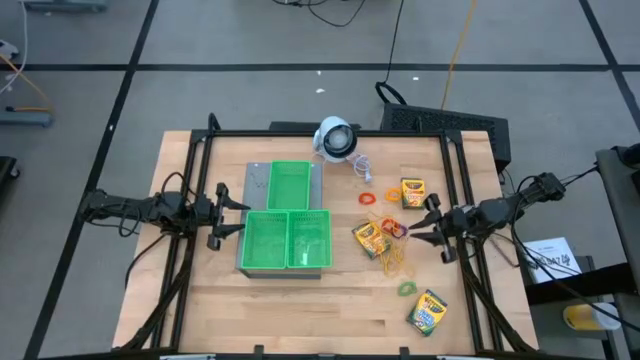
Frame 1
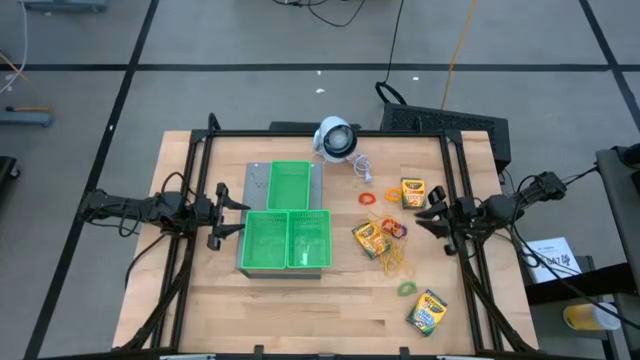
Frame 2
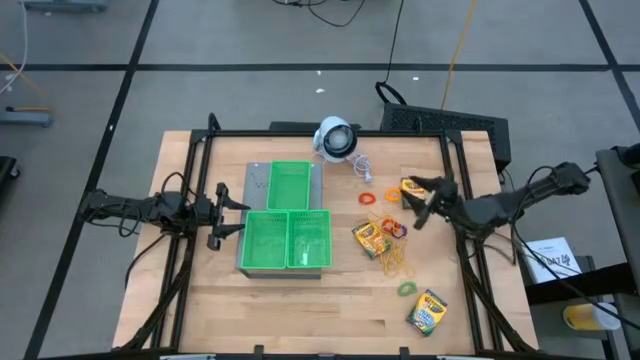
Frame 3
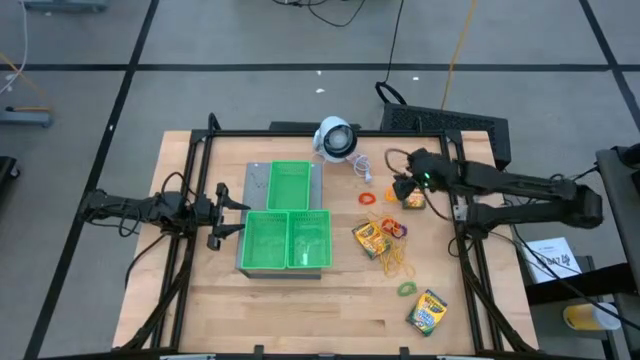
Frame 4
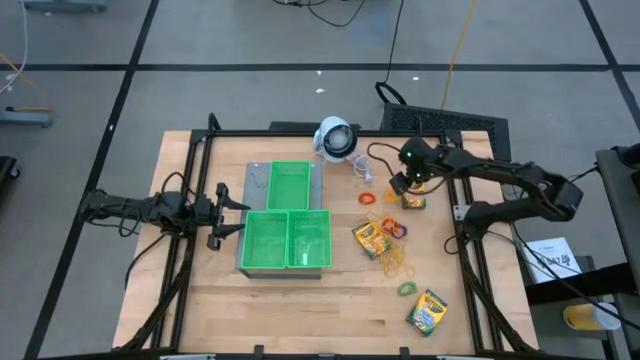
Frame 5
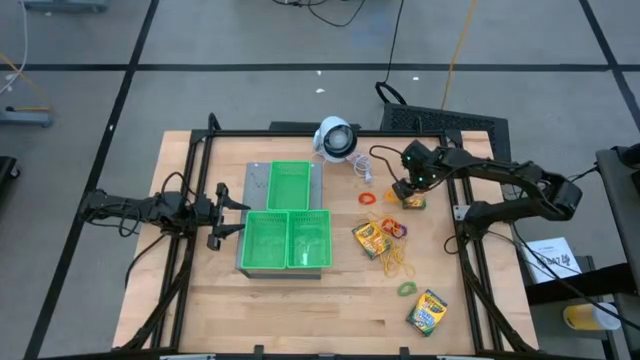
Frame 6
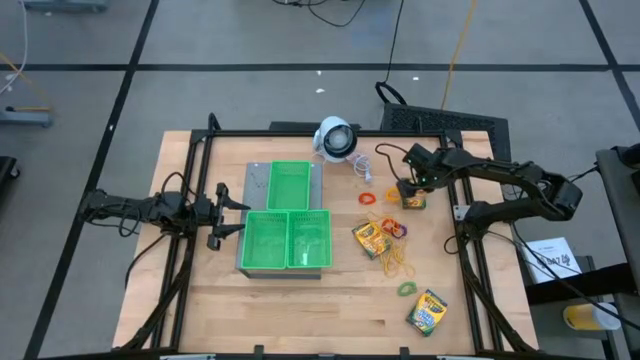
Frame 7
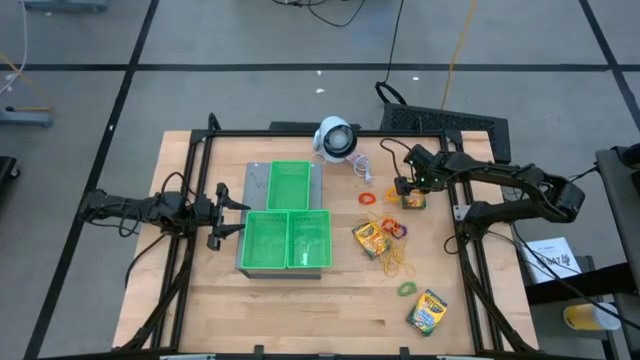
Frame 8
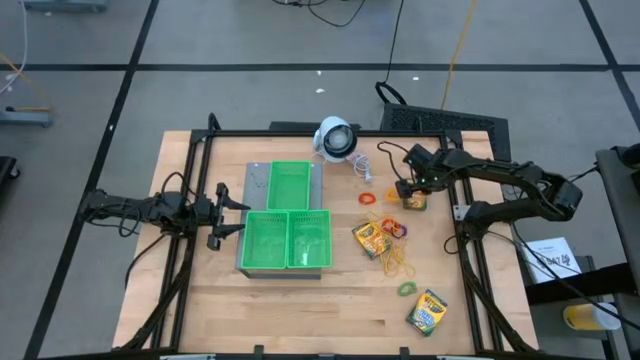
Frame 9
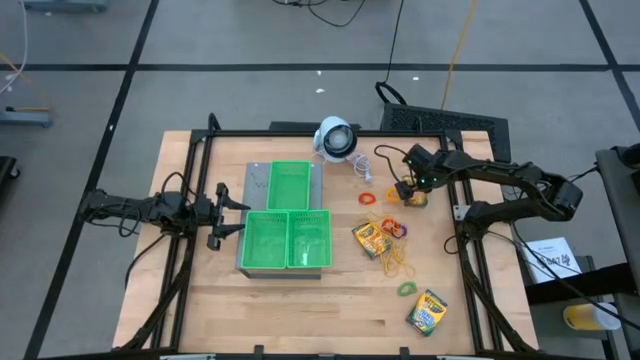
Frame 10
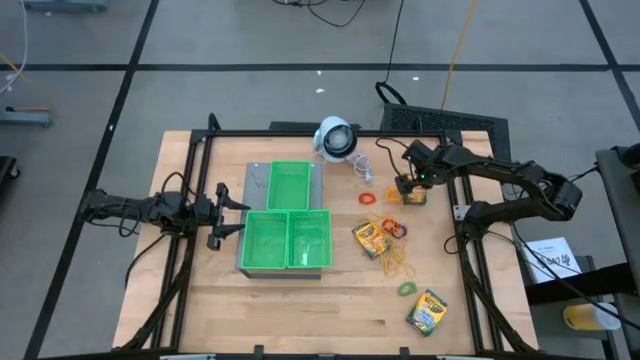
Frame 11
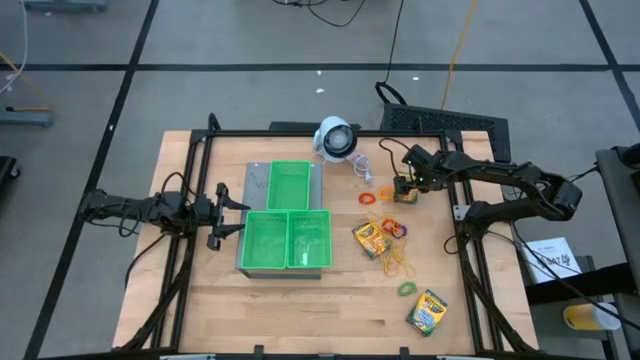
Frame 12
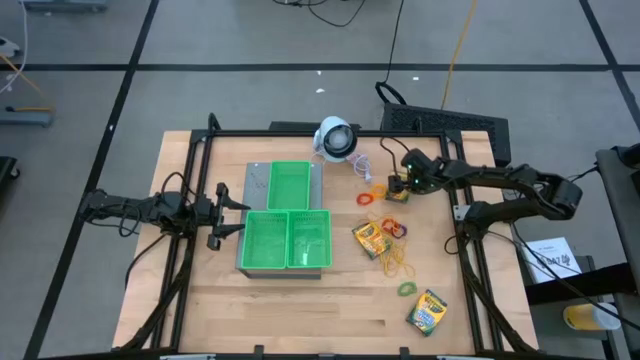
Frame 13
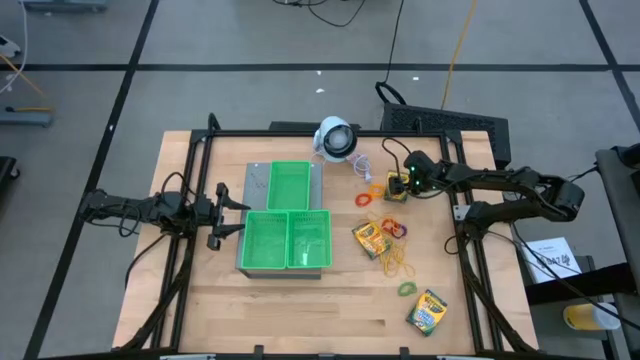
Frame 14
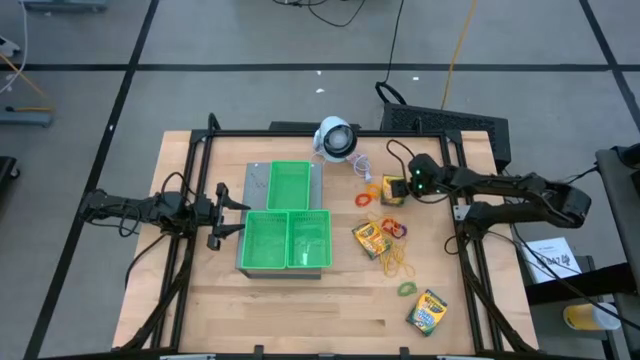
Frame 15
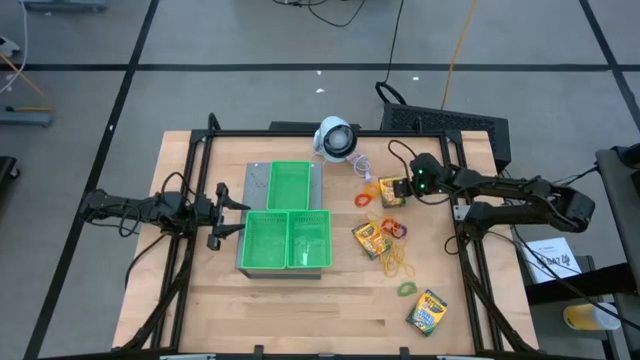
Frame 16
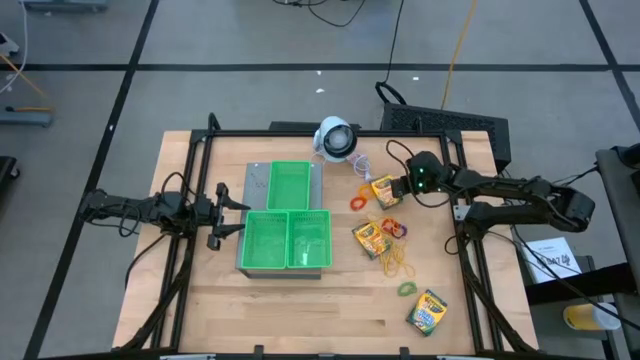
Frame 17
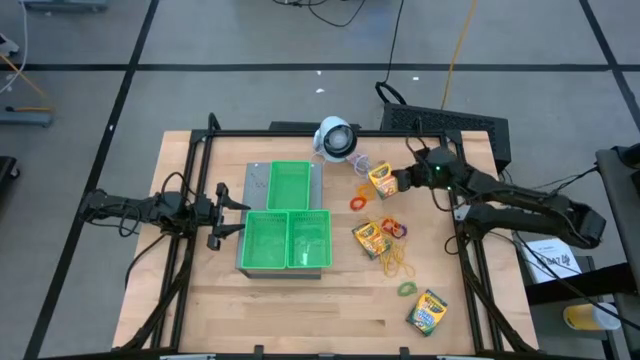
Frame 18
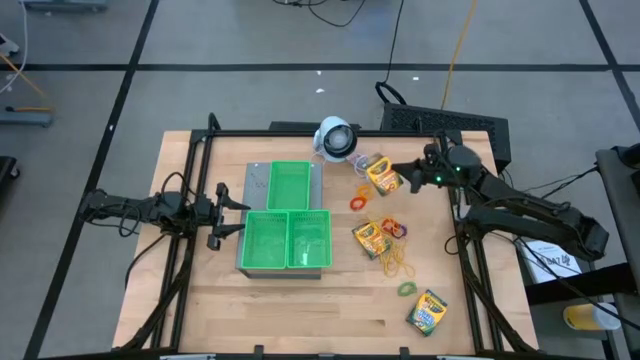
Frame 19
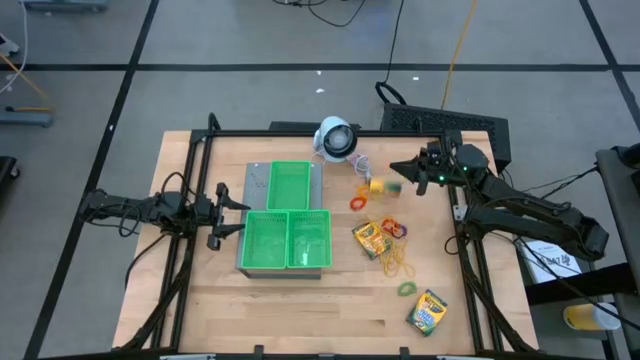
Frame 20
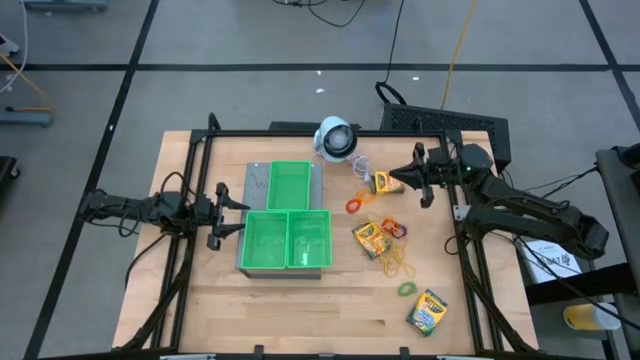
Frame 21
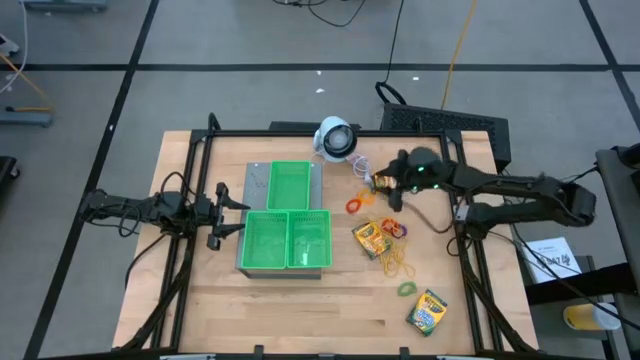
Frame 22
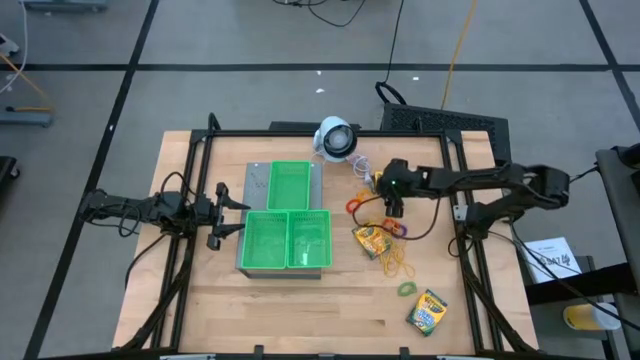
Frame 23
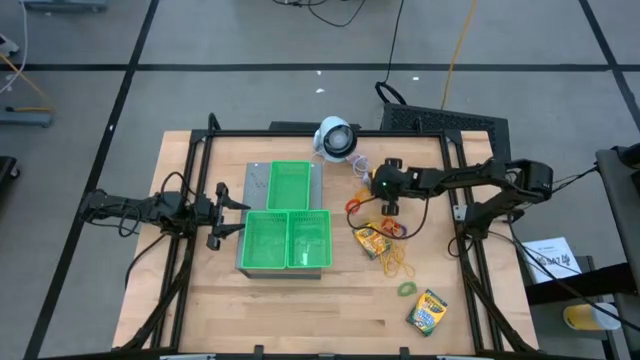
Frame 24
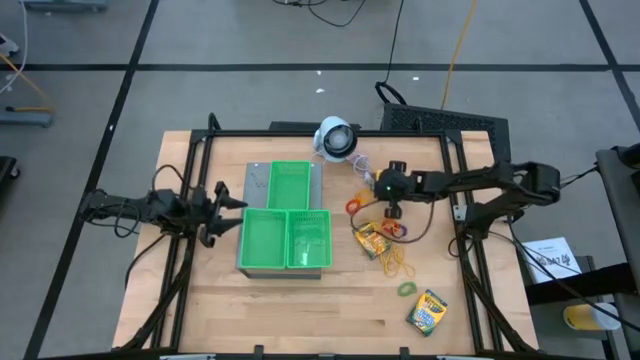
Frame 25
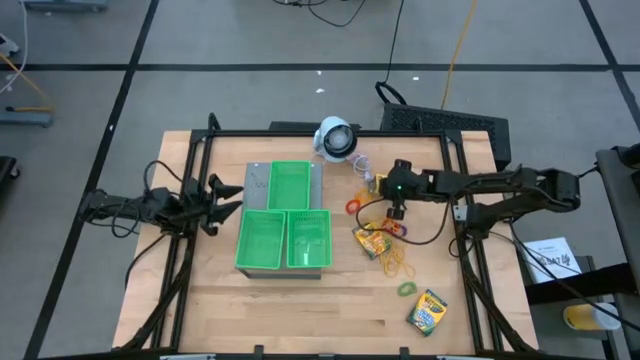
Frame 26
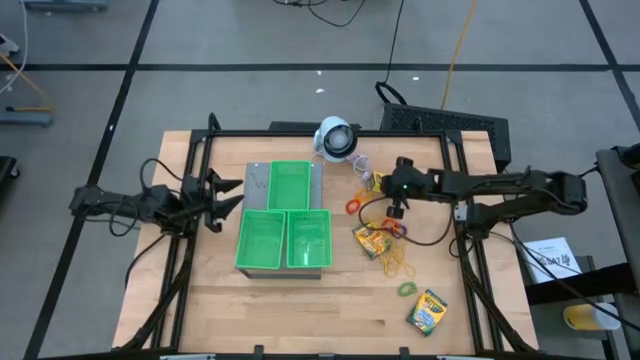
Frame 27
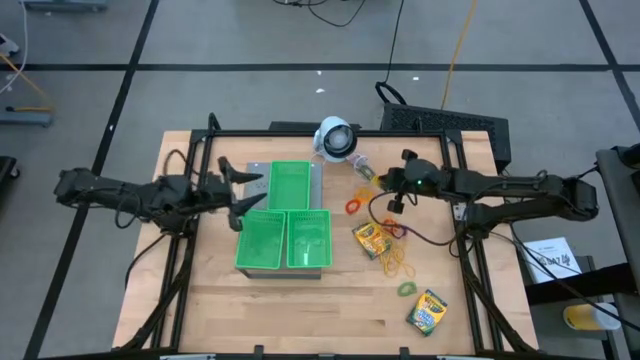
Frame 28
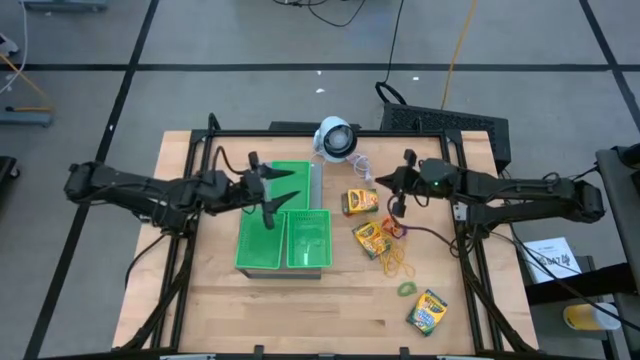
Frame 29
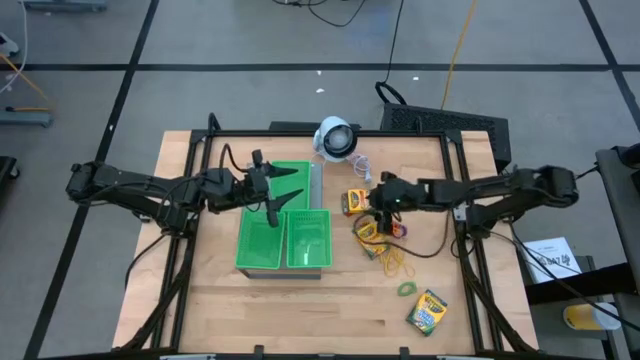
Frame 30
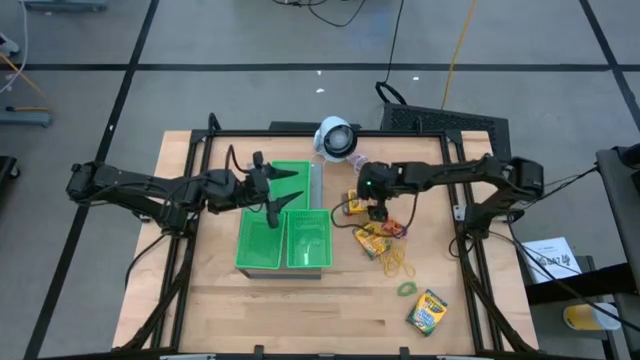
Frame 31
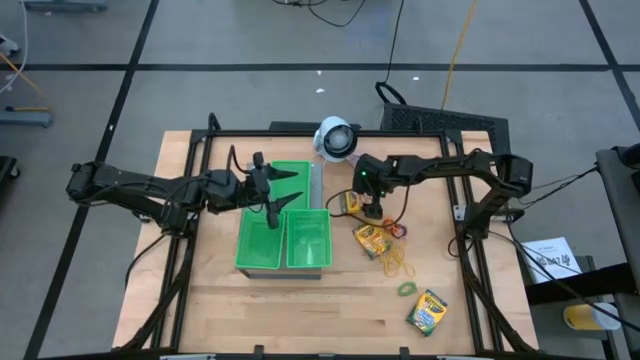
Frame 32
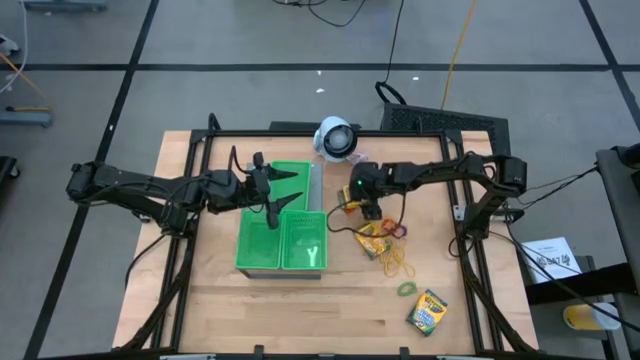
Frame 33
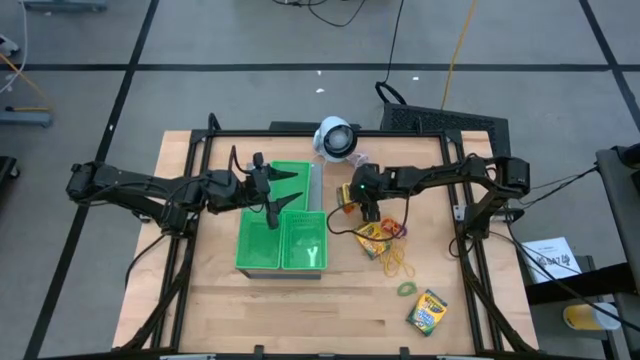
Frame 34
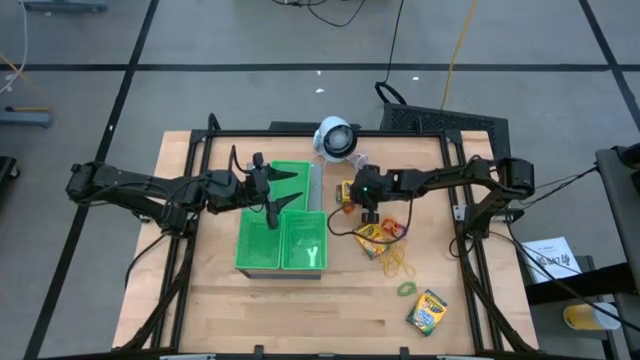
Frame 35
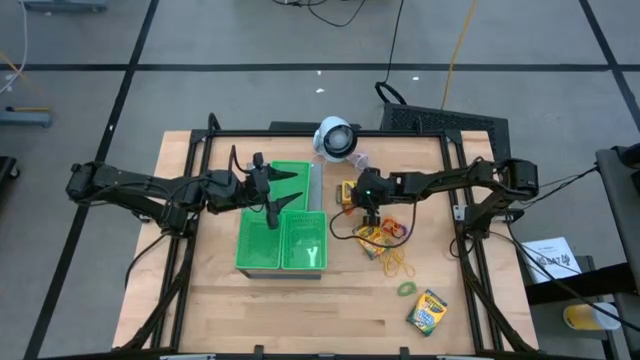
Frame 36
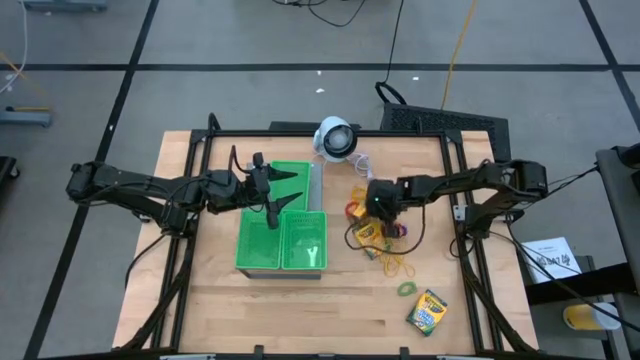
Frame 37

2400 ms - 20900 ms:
Task: Pick & Place Office Desk Supplies
Put the crayon box into the top green basket on the shelf

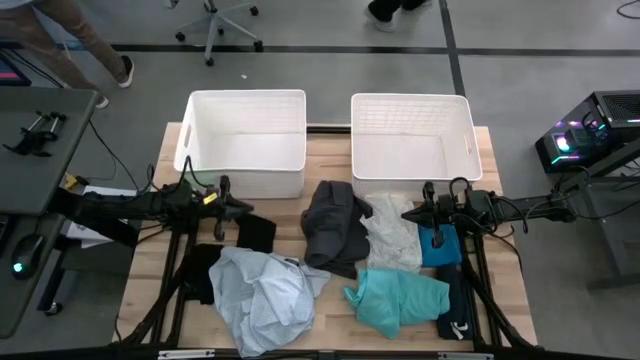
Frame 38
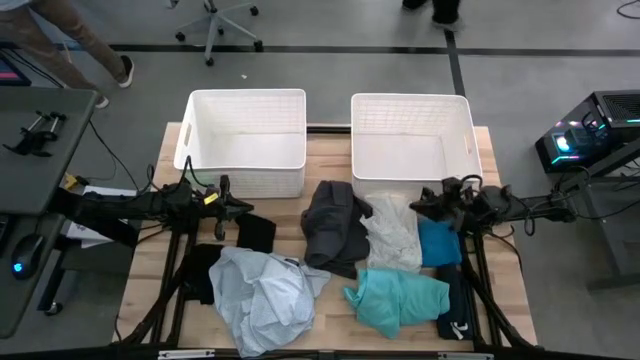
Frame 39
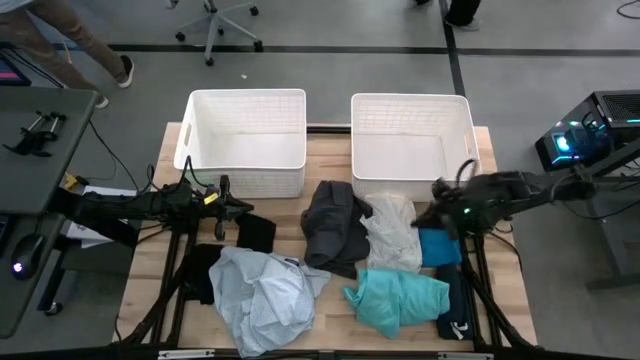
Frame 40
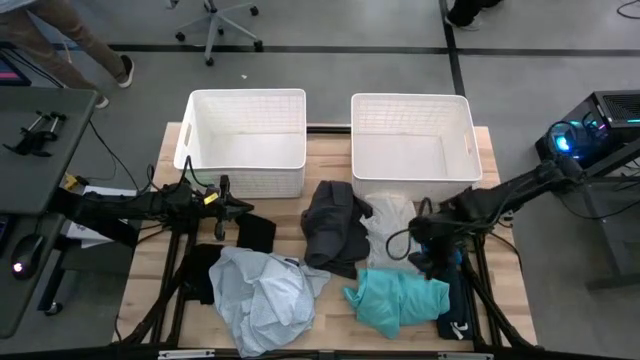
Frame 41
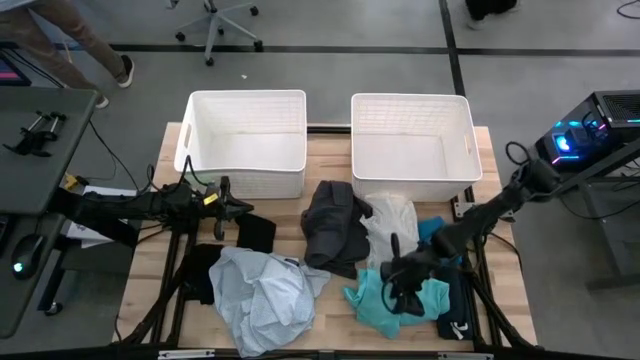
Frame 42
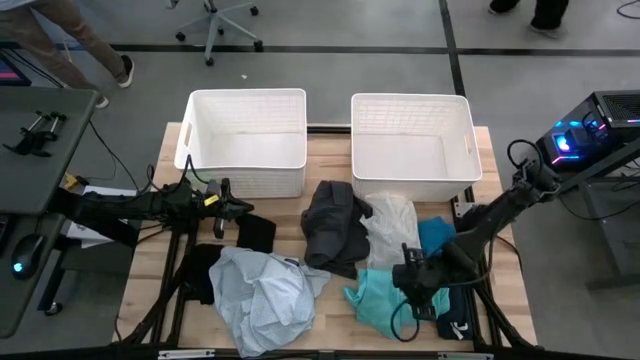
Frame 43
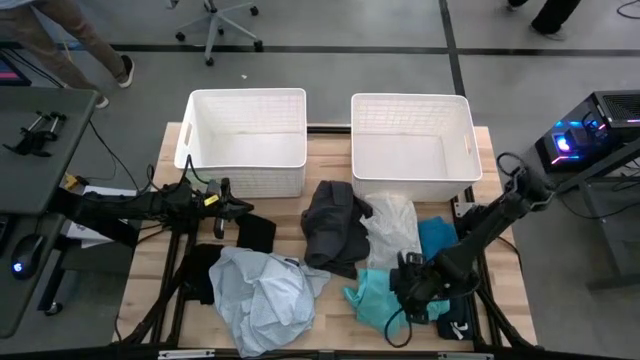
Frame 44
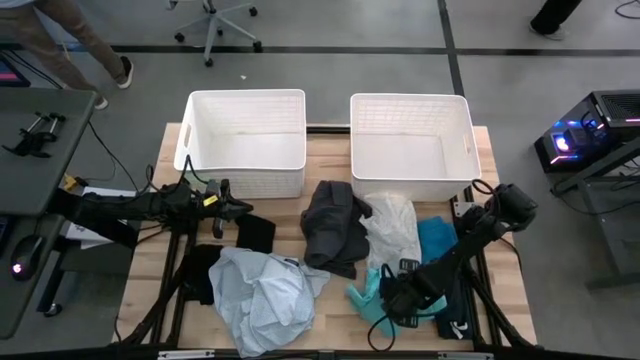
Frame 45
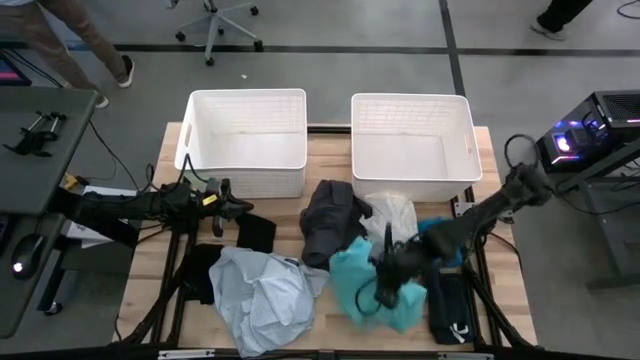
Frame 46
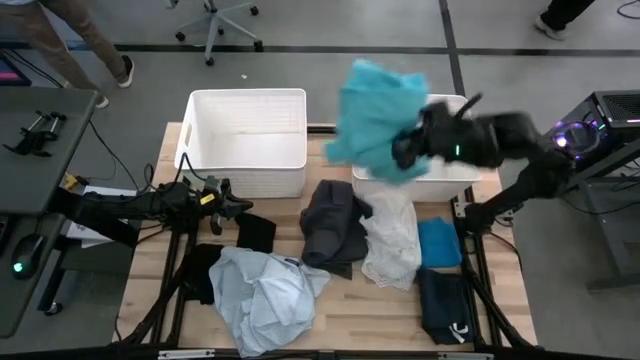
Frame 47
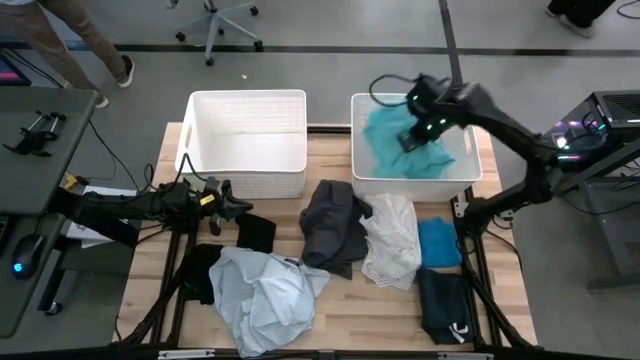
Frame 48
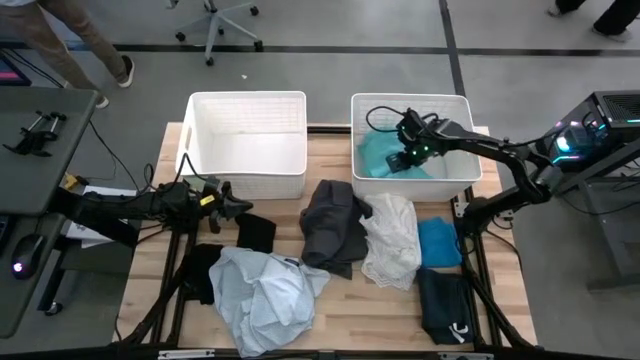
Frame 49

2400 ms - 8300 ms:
Task: Sort clothes
Put the light blue shirt into the right white bin
